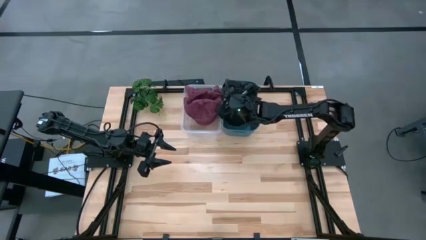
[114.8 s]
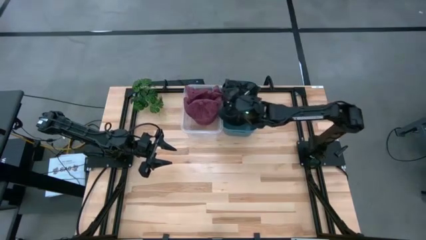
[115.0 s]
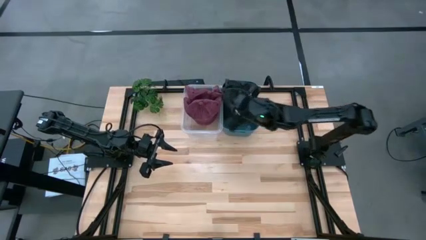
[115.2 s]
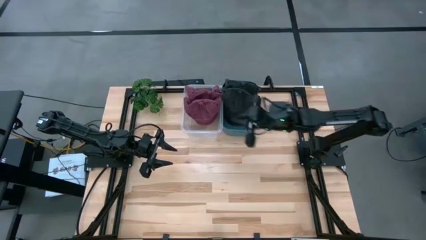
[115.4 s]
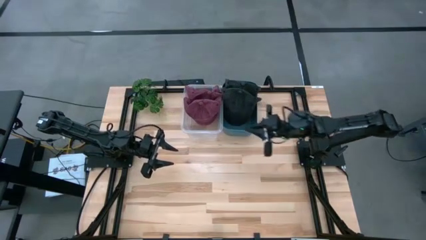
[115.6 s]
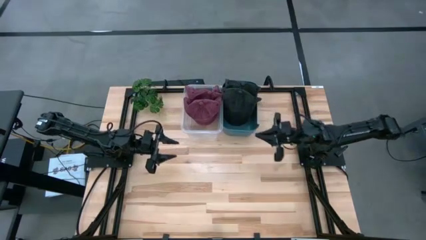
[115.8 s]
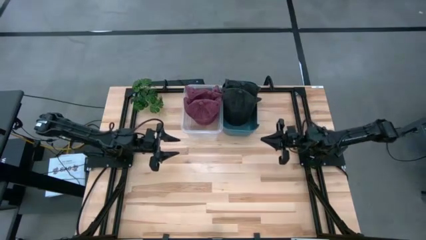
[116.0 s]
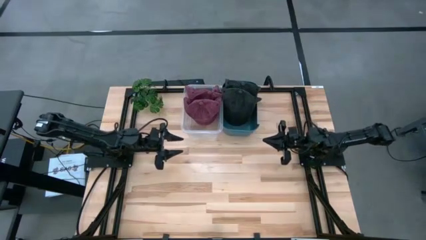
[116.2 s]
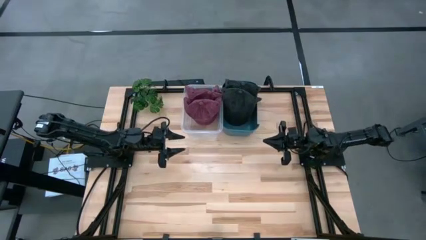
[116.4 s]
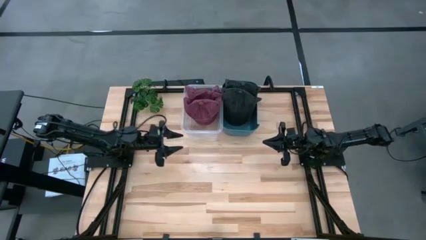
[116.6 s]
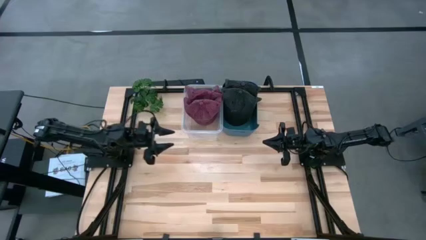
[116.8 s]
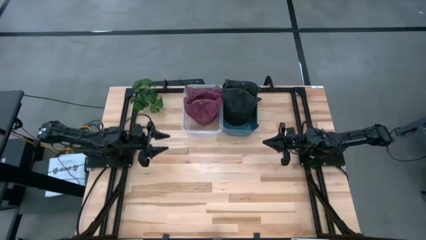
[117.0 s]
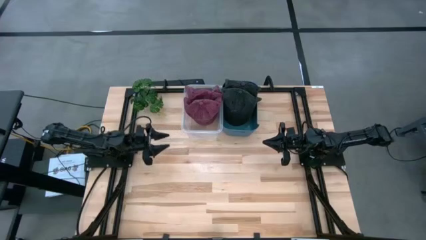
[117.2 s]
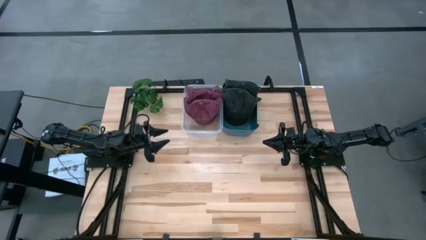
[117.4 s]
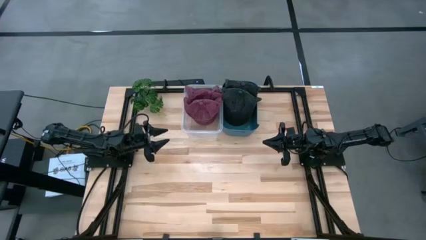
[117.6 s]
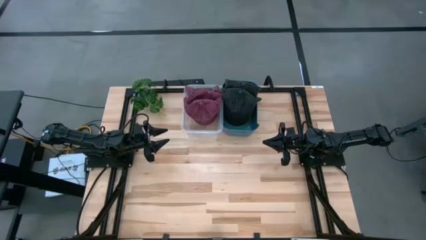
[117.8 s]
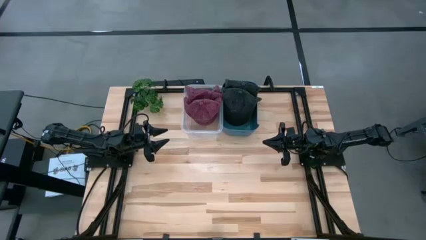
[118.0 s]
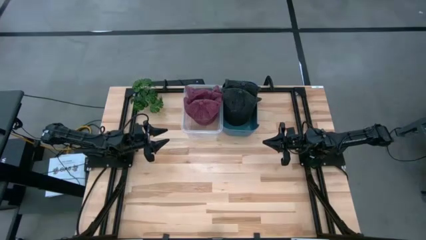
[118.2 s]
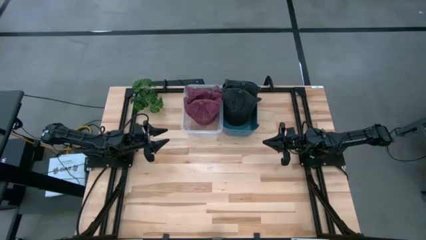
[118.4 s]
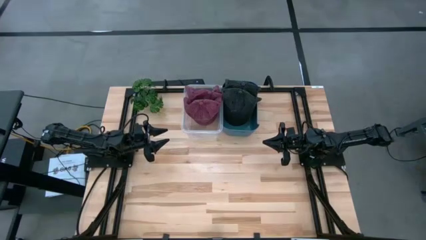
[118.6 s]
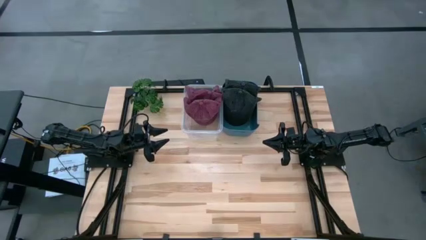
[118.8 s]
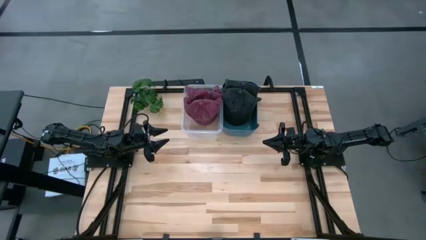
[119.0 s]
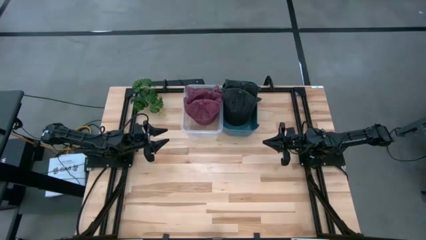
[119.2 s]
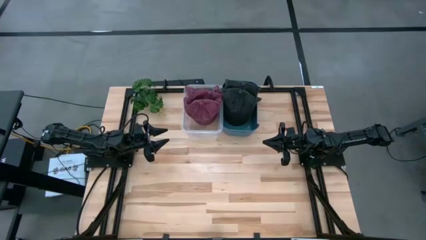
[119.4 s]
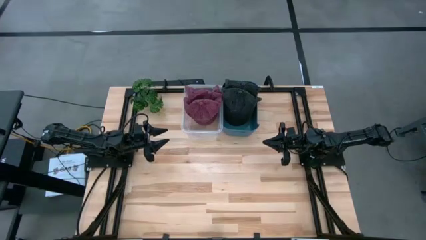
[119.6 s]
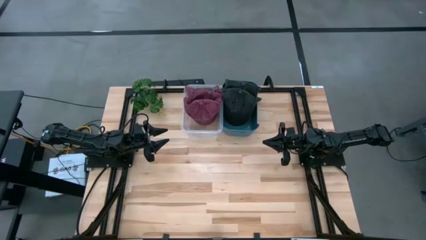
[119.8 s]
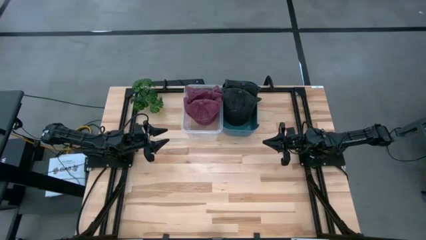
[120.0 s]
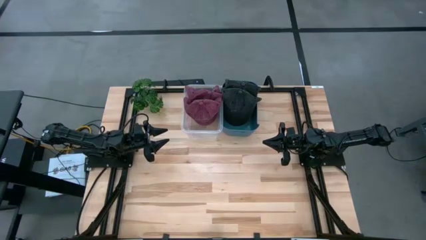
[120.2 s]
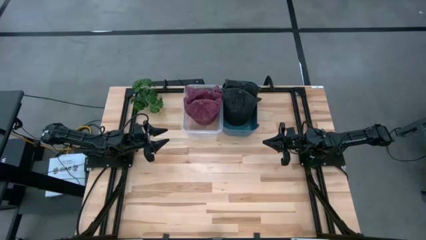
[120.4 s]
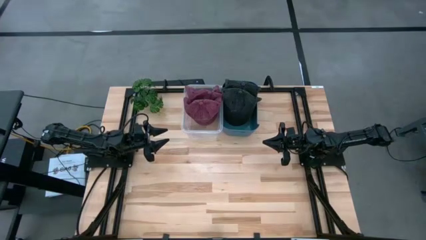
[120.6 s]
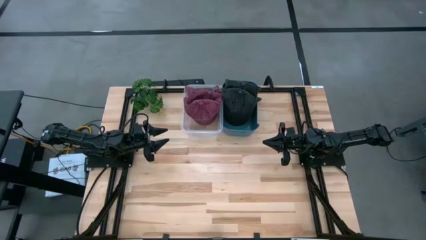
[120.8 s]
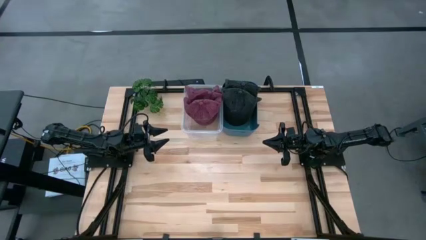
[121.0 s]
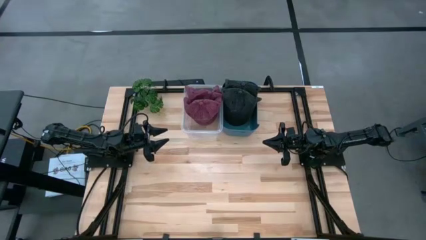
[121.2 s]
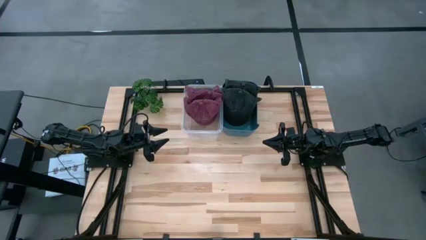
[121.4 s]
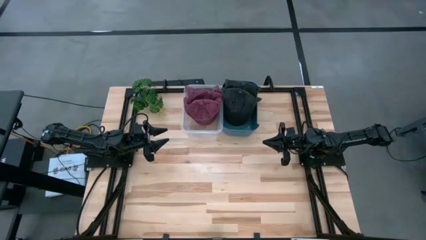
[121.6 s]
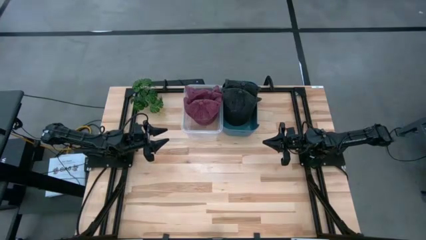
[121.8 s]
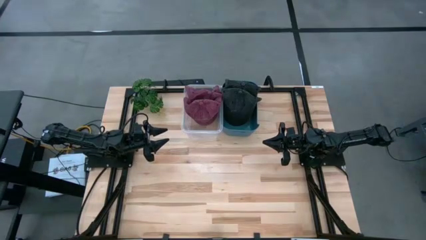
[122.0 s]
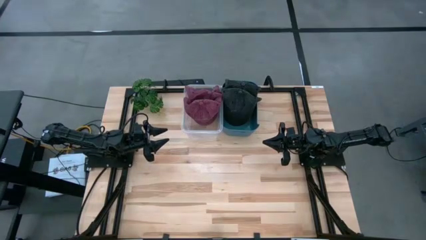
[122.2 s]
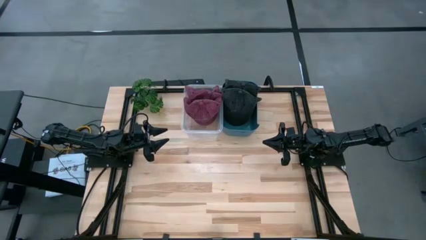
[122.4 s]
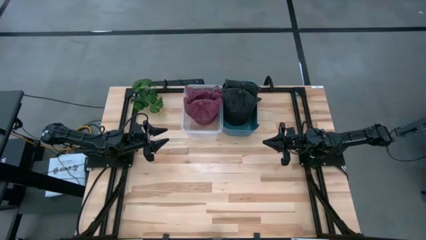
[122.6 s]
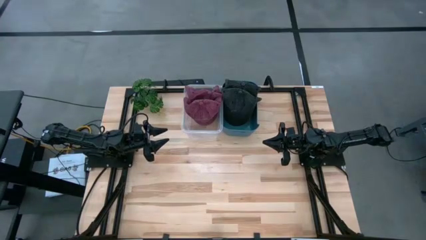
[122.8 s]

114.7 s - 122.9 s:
Task: Pick & Place hat
Return to Home Position

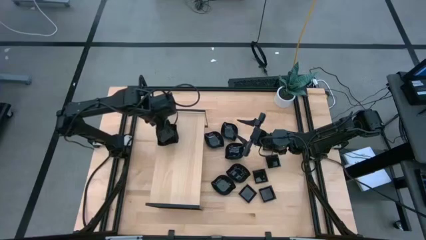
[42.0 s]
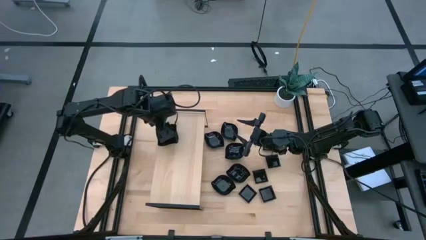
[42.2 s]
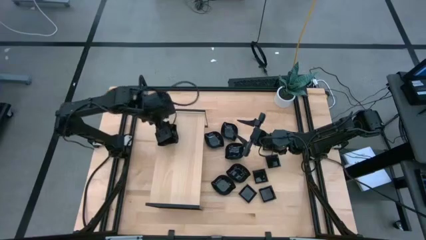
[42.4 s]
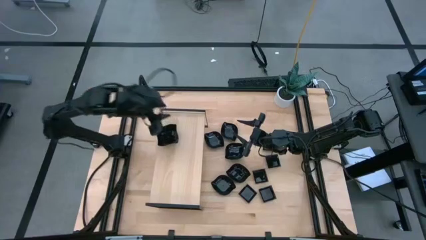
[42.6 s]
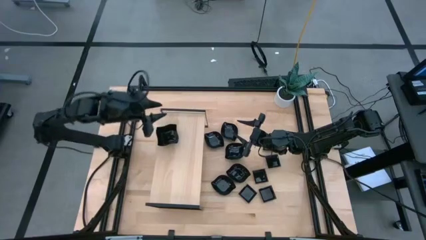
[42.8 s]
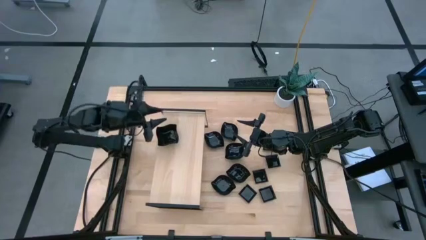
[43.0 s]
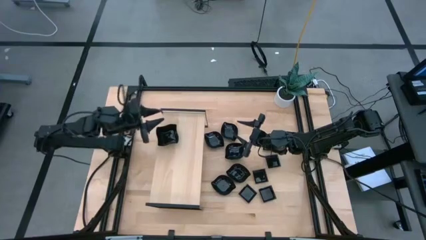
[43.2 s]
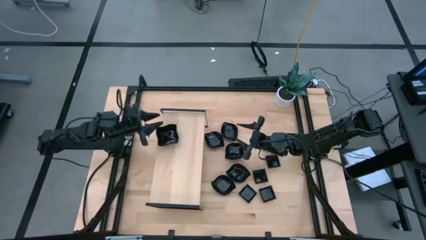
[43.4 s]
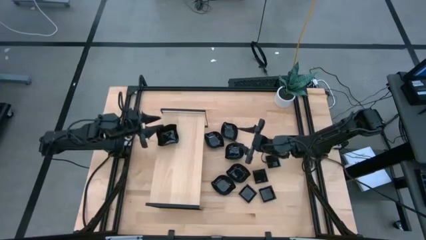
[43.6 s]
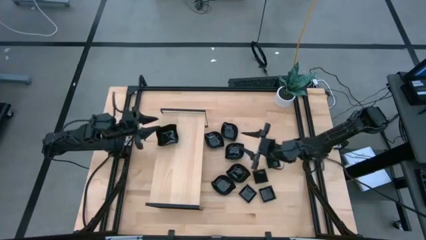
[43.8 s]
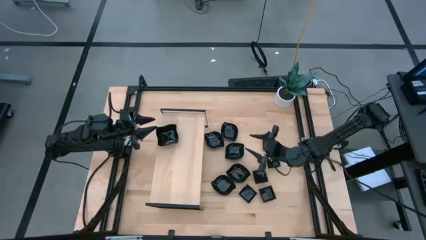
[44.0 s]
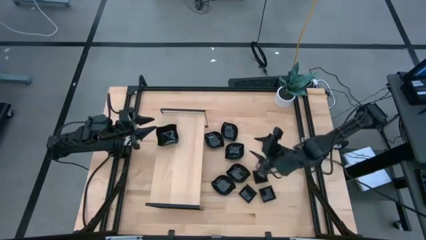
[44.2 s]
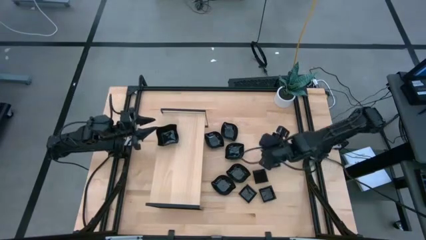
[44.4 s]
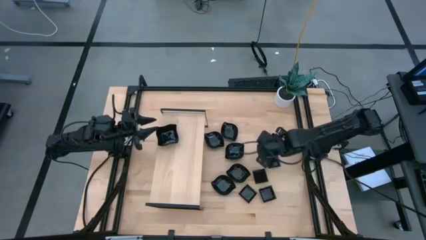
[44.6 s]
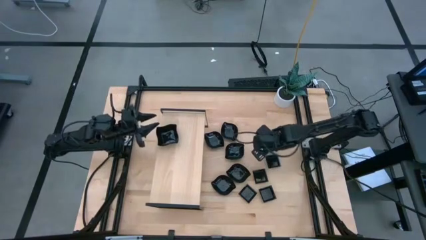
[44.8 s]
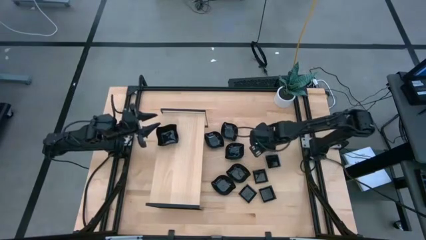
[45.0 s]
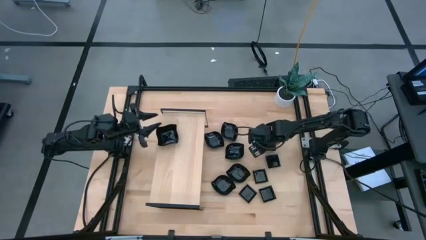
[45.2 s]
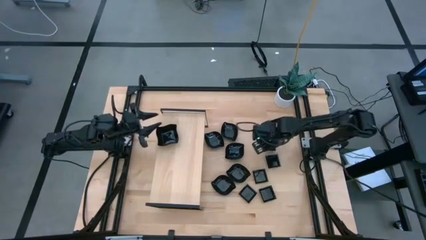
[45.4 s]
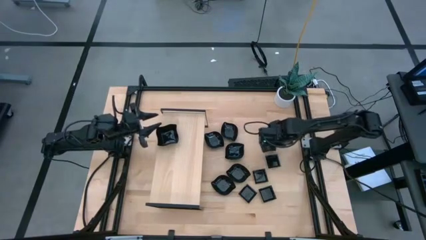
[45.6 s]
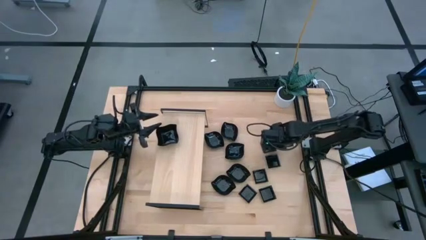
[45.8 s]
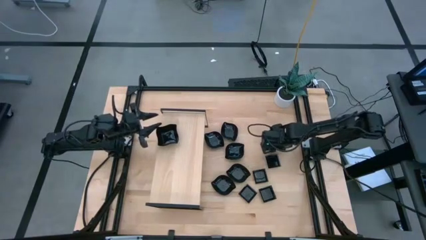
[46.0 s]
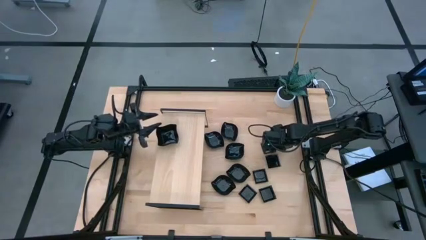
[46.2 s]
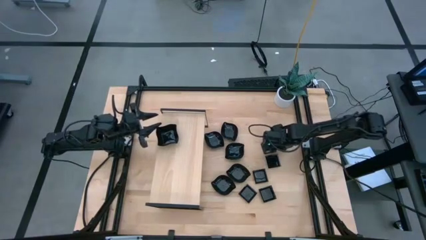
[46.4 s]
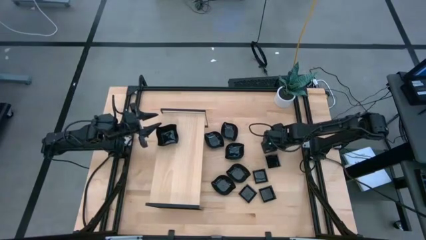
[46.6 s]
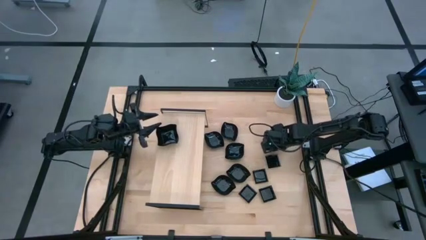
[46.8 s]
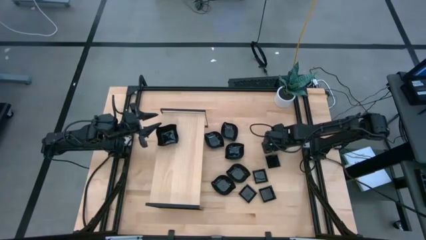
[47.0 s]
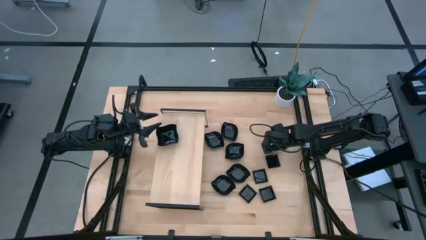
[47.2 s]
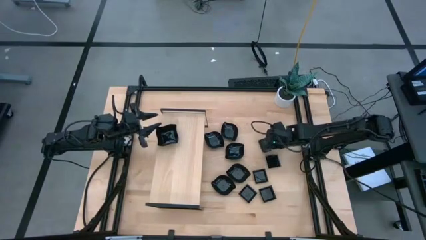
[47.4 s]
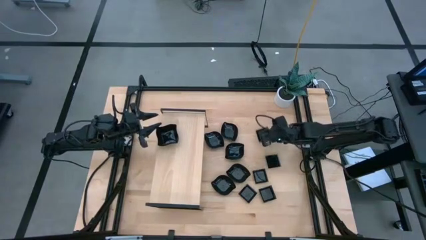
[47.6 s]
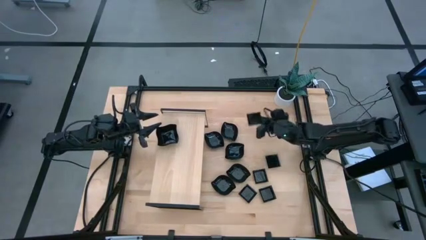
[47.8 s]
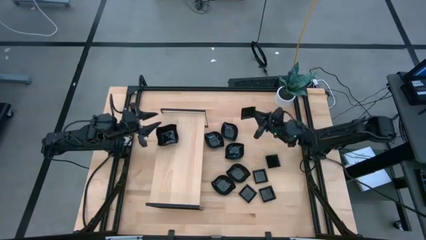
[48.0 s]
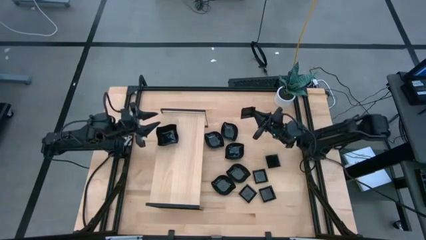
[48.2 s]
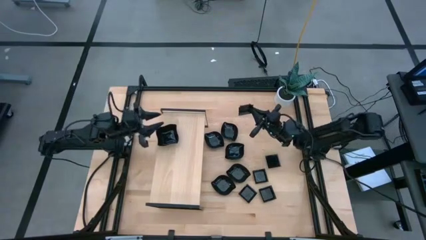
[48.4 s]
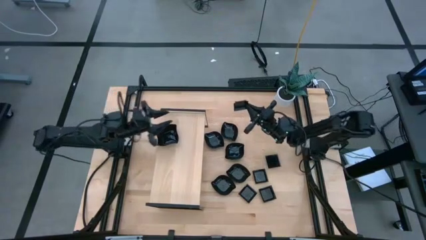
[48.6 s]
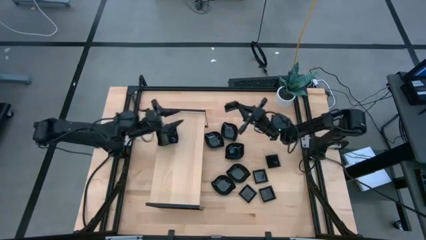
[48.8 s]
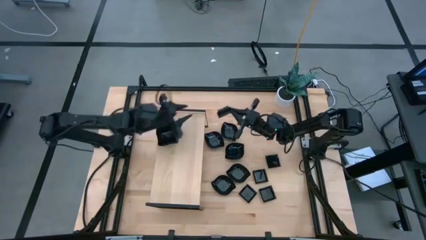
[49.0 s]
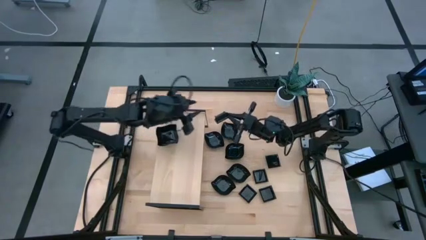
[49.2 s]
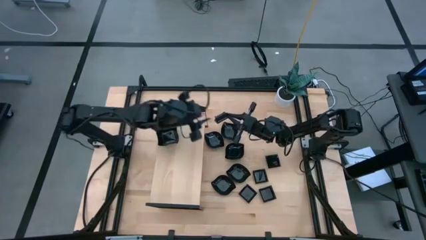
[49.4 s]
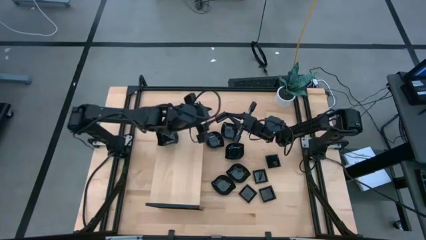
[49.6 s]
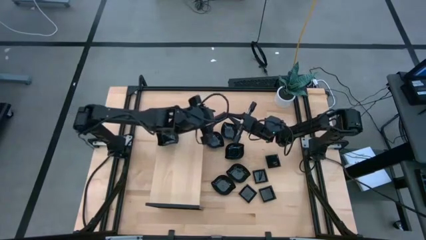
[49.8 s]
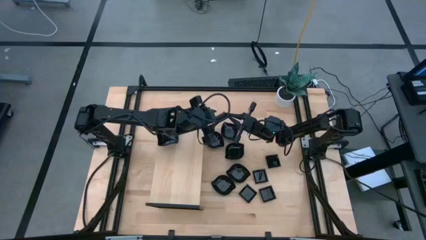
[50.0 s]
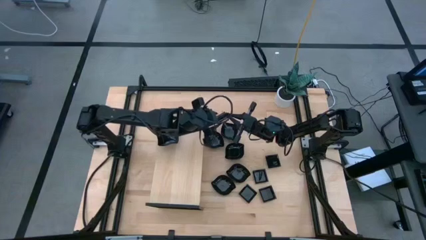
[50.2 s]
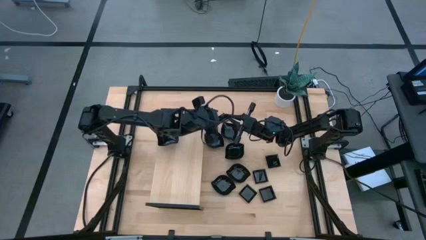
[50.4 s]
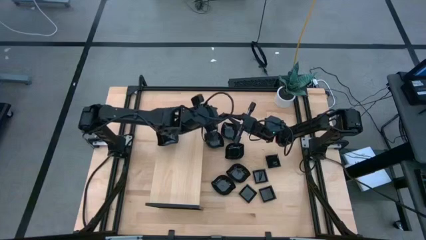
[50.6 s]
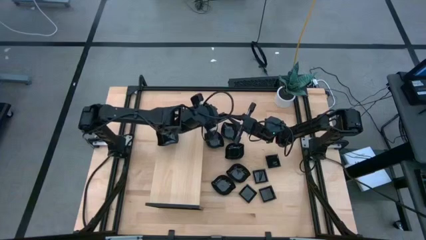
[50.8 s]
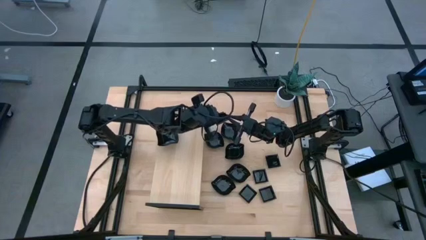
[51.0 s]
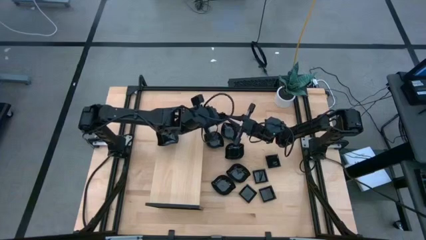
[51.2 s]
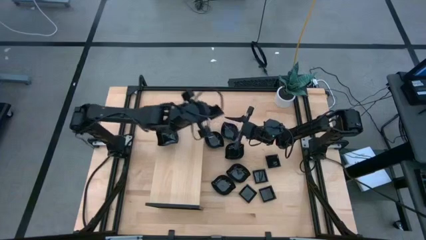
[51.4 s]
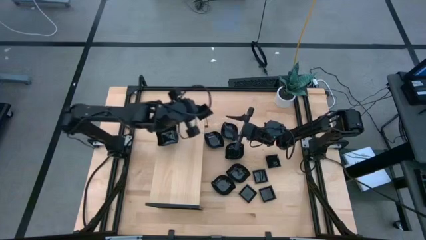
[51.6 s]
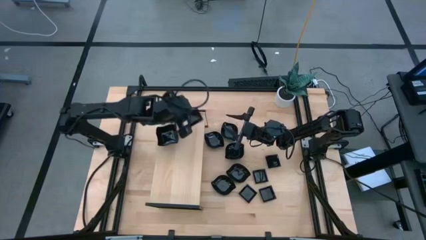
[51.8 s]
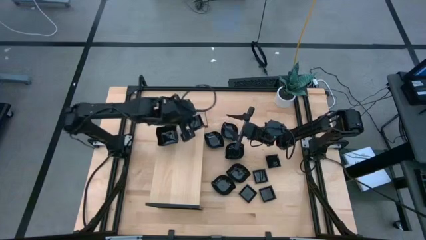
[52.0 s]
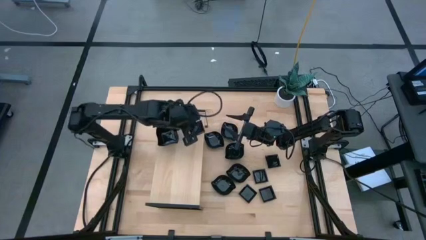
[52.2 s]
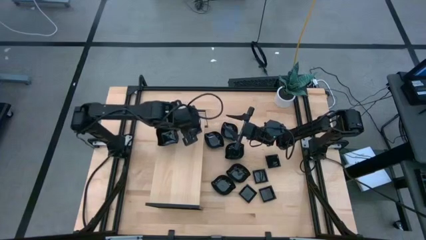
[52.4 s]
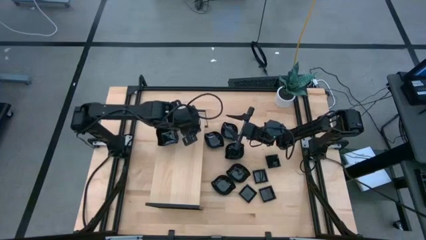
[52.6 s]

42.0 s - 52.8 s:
Task: Pick & Place Mini shaped plates
Put the square plate on the shelf
